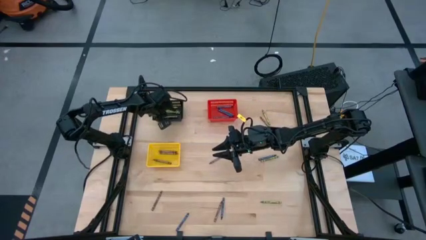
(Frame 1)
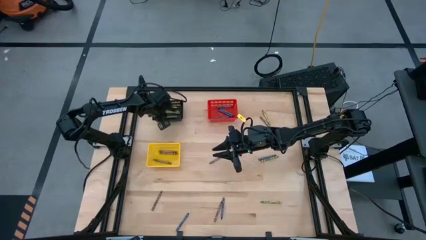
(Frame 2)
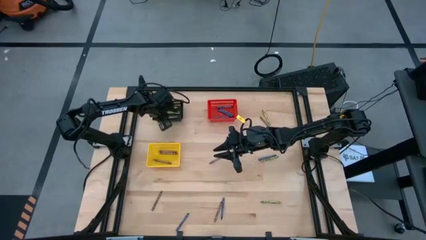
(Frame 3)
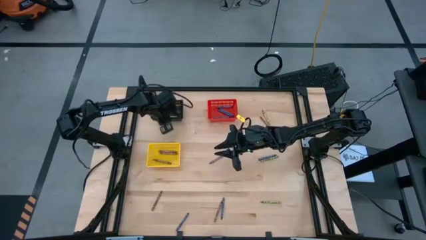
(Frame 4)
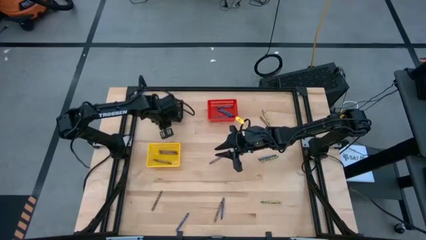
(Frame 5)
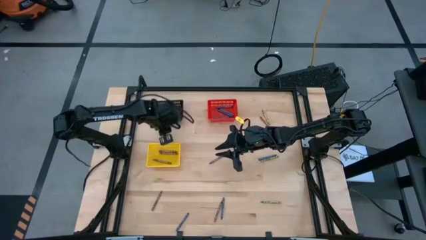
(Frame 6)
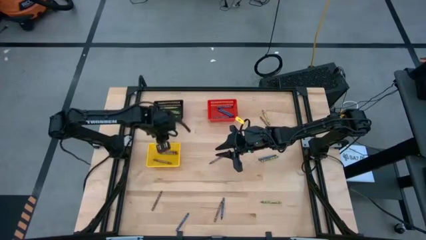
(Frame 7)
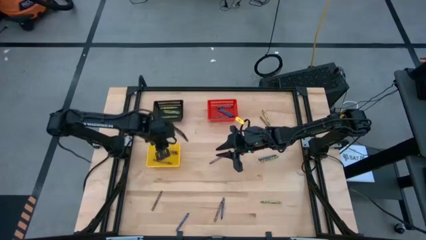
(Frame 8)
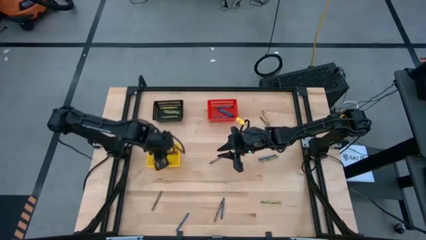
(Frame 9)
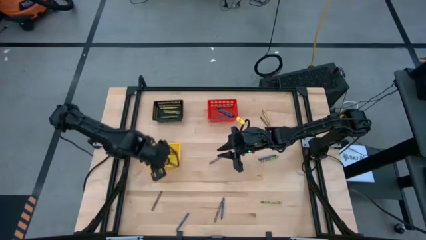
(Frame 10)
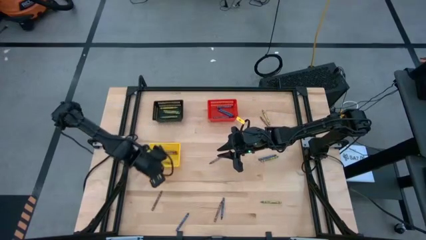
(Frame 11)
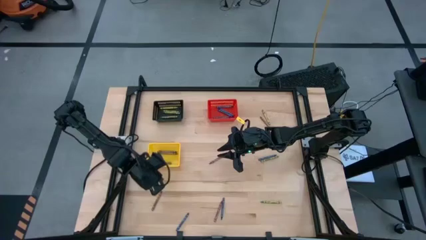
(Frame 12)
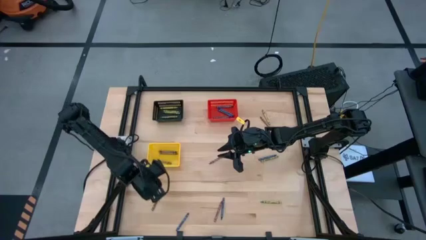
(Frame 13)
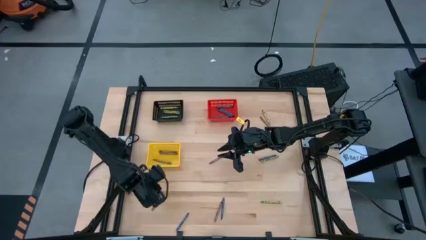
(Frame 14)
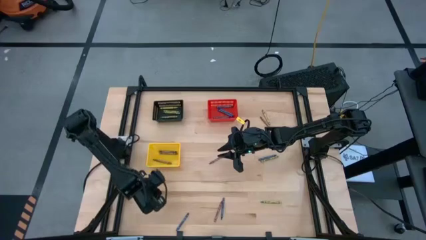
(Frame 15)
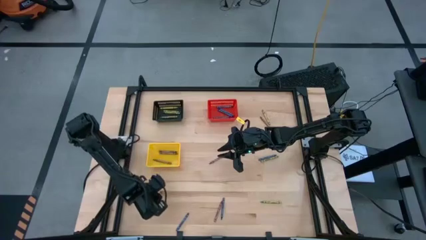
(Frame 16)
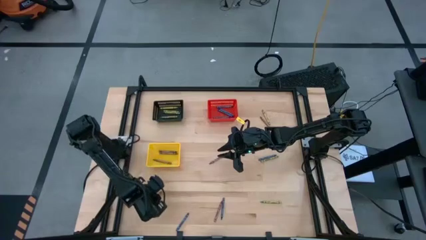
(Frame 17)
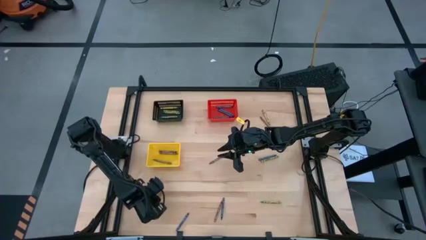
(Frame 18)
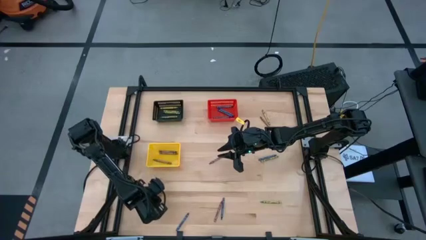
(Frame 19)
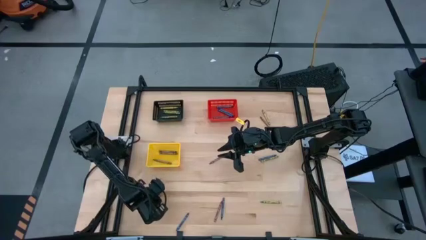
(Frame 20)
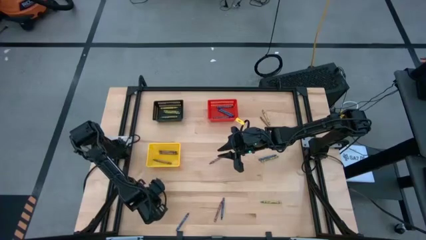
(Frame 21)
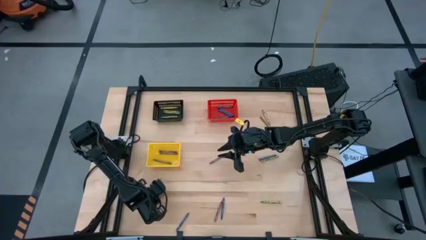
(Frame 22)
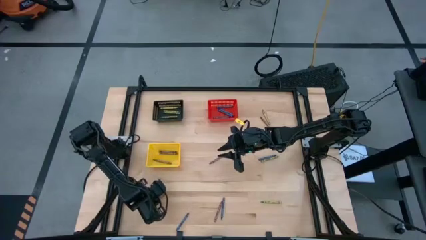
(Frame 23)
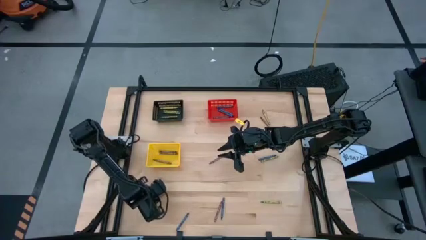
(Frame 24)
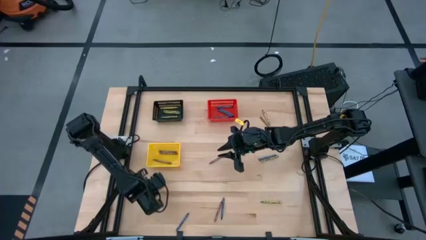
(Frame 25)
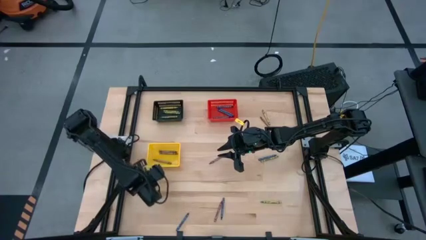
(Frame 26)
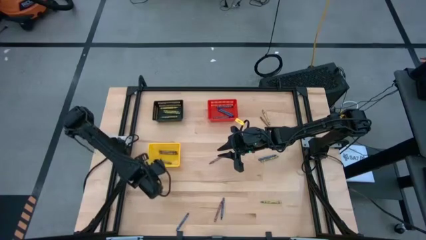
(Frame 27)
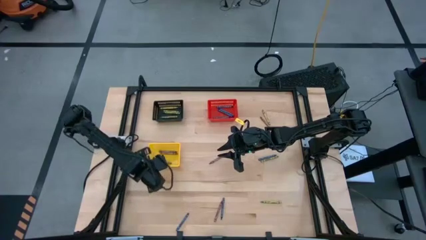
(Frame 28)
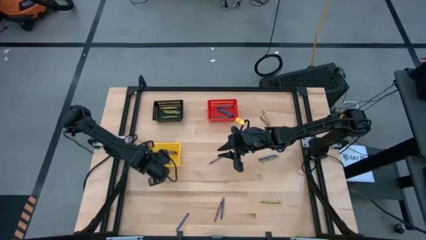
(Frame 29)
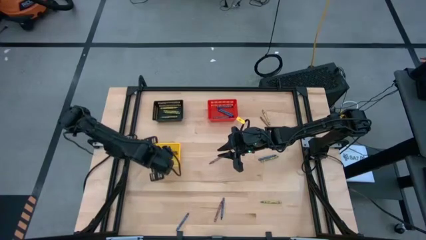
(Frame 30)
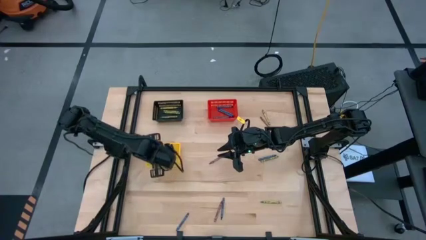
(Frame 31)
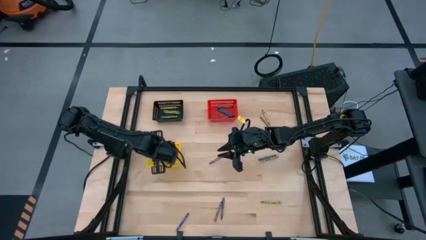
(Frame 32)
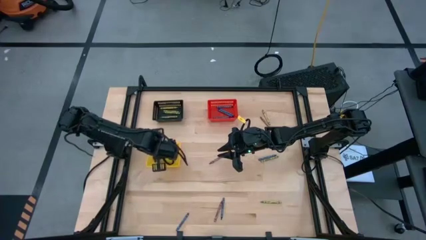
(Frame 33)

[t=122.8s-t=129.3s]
Task: Sort crayons
Put the brown crayon into the yellow basket

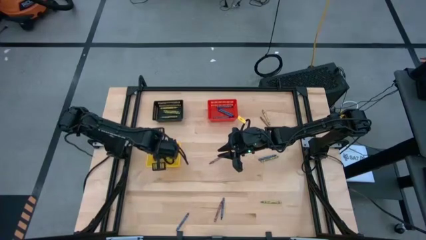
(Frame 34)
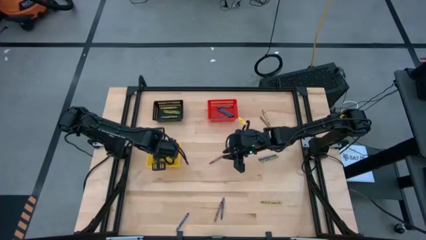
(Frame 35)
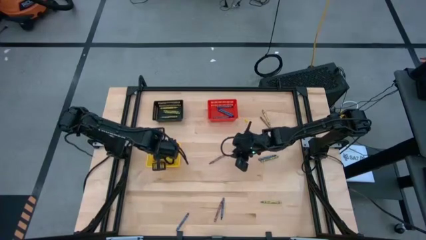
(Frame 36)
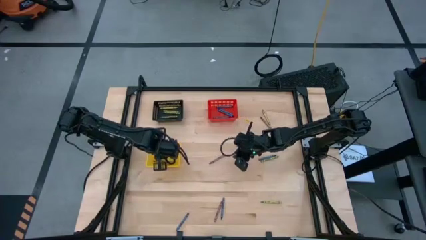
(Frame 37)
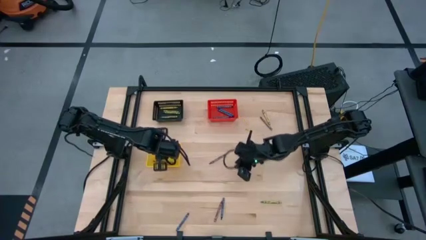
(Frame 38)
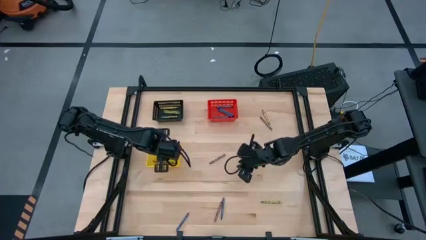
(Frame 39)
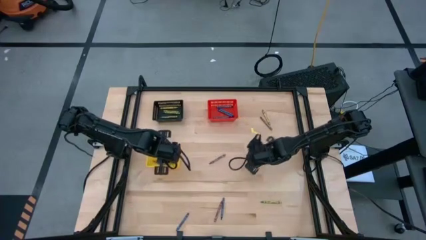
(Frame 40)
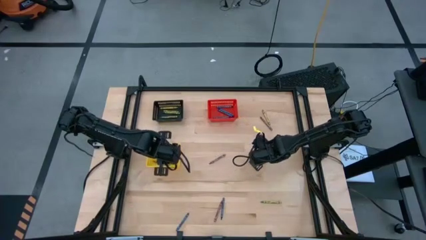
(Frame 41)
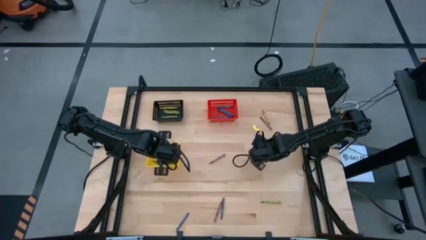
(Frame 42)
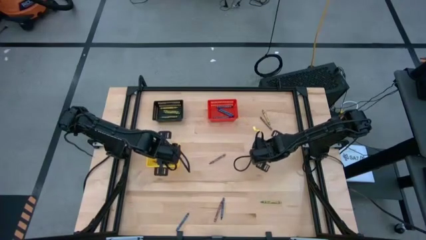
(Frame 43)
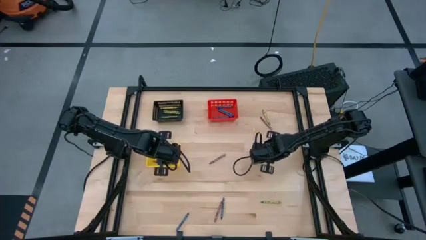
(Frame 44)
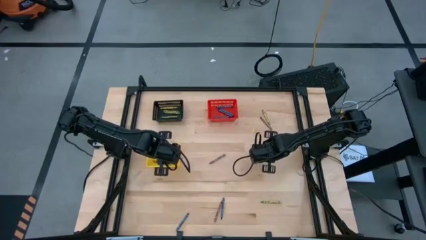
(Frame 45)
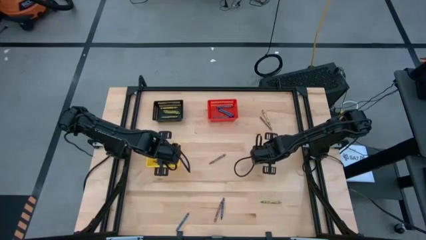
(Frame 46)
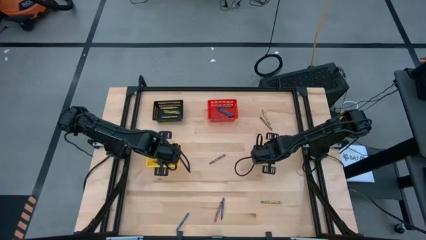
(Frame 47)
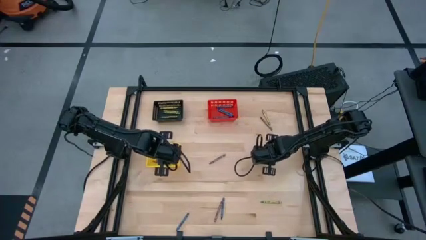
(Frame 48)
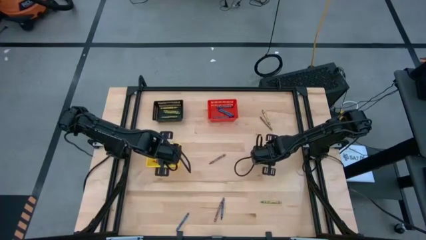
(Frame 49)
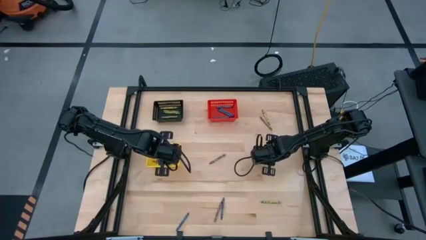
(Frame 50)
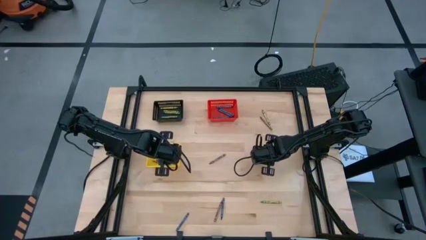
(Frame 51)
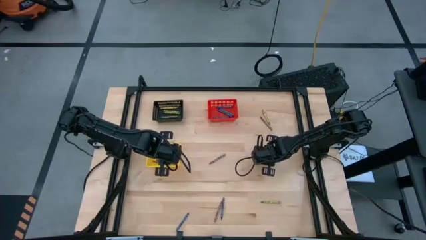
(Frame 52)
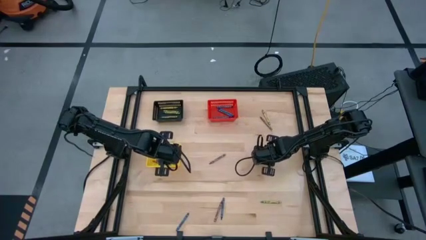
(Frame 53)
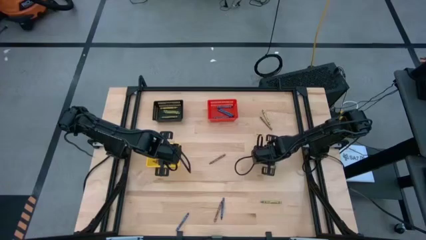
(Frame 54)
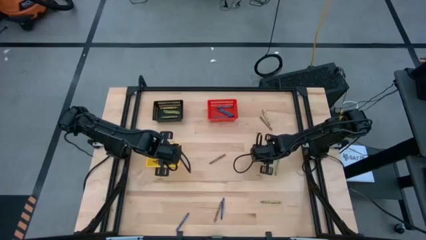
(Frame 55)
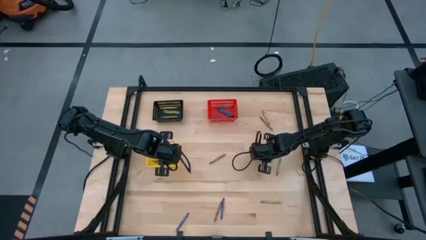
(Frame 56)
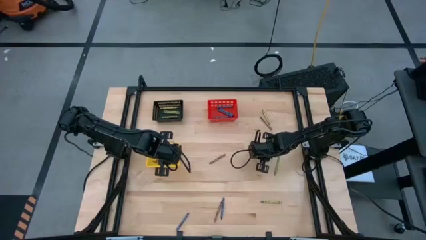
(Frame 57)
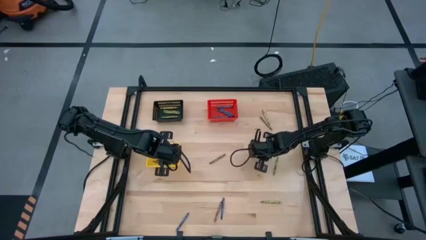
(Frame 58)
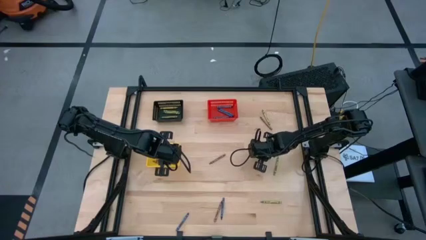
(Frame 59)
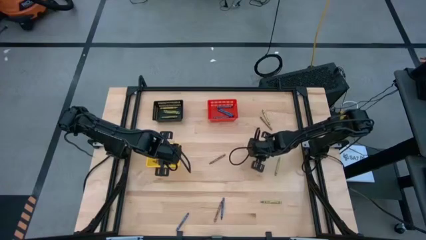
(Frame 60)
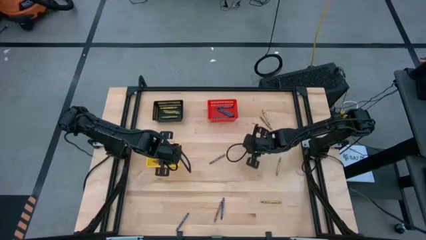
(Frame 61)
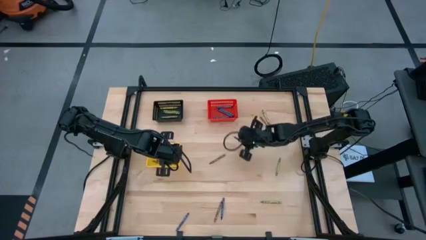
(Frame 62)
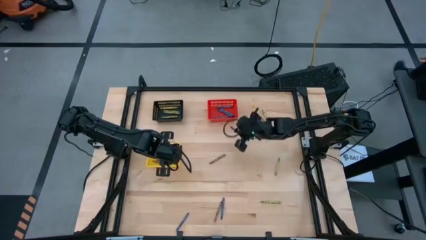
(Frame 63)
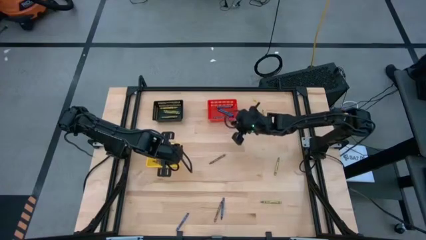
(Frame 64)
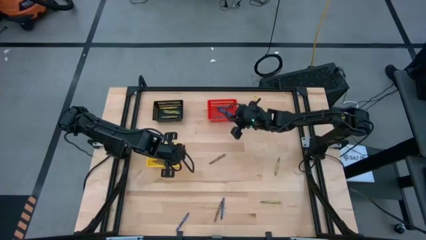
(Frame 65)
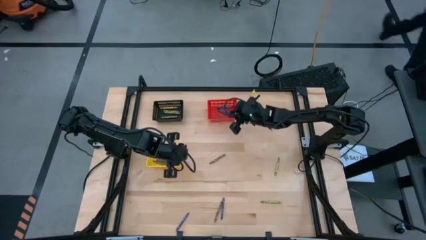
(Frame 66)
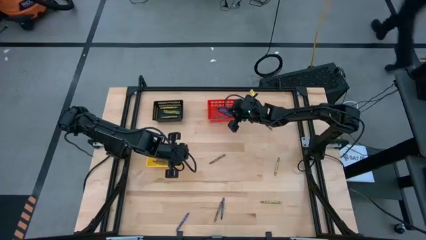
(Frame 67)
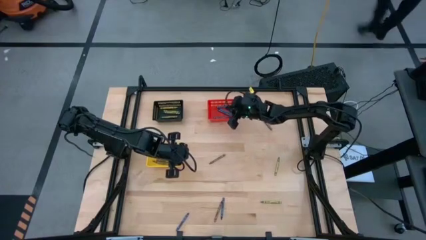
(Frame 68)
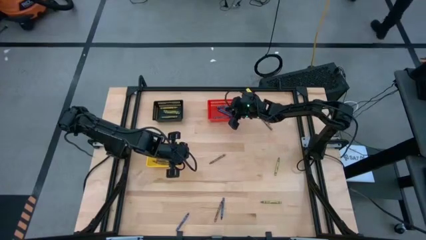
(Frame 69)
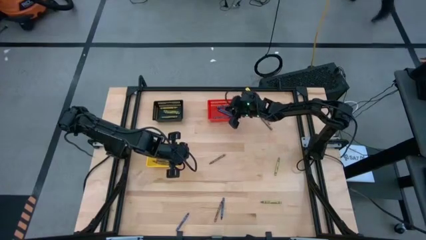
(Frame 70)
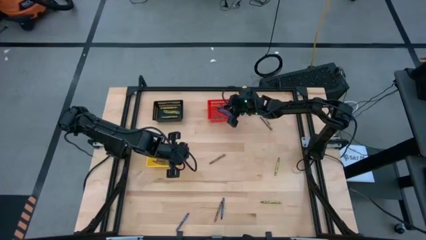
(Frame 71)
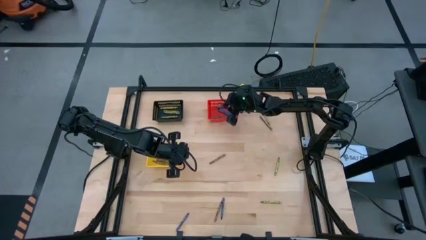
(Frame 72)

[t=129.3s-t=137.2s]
Put the blue crayon into the red basket
